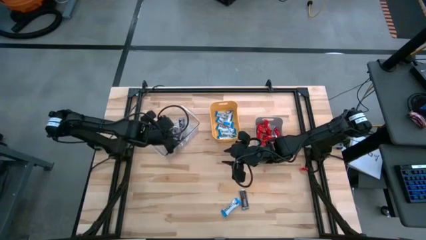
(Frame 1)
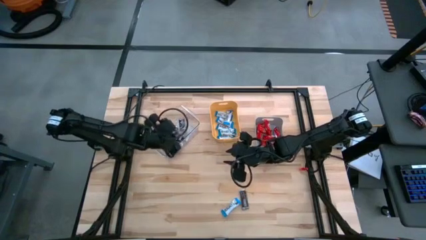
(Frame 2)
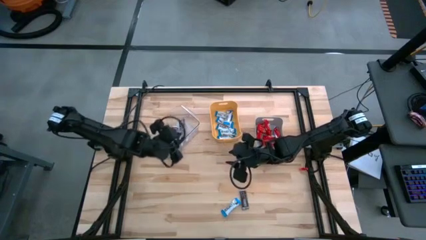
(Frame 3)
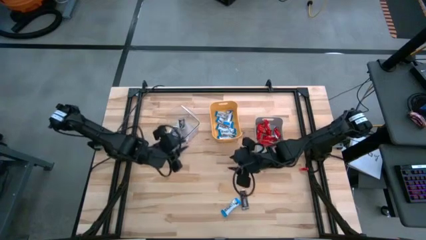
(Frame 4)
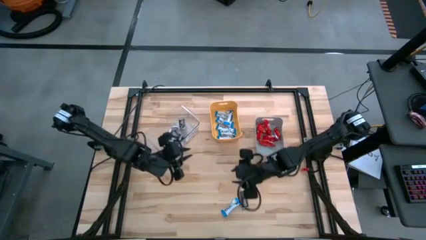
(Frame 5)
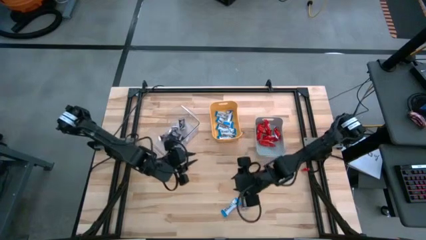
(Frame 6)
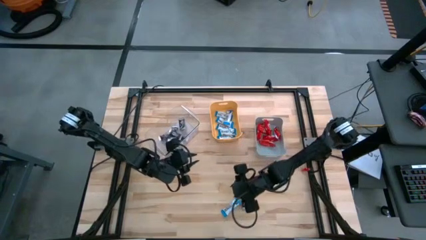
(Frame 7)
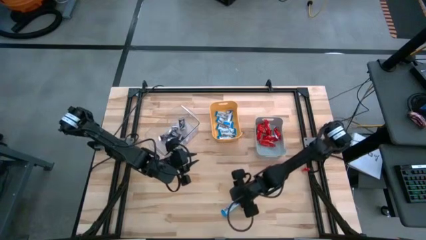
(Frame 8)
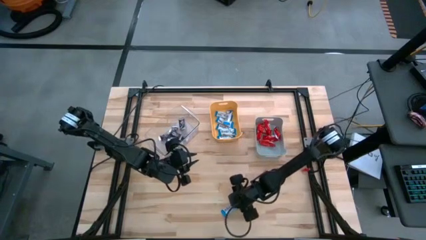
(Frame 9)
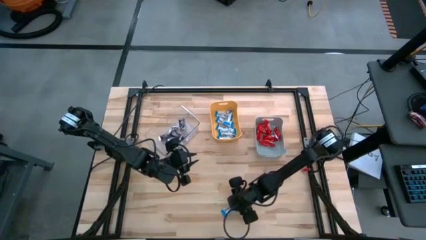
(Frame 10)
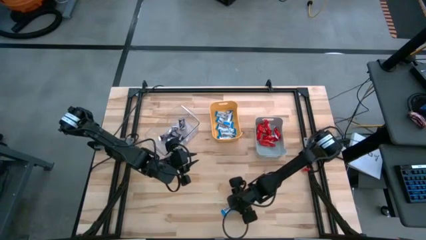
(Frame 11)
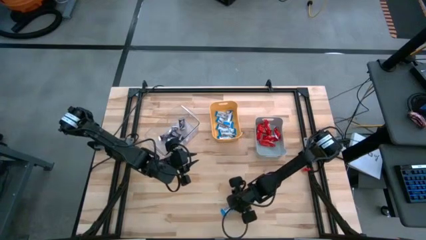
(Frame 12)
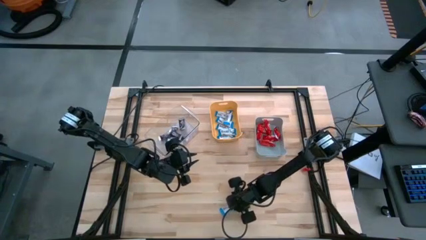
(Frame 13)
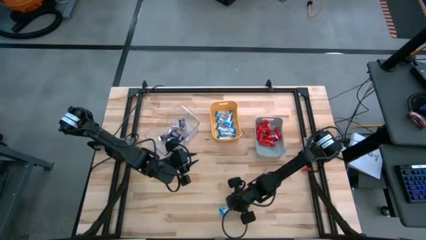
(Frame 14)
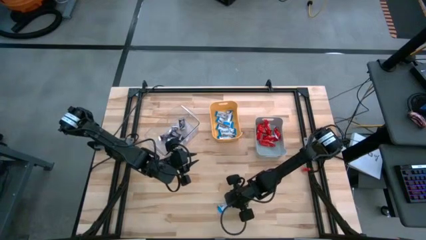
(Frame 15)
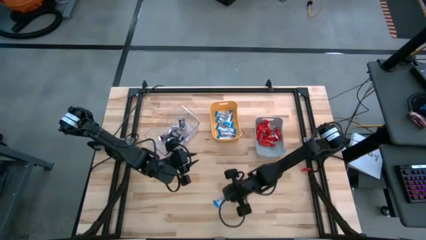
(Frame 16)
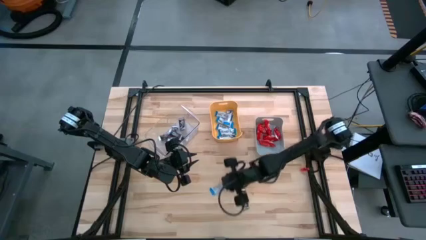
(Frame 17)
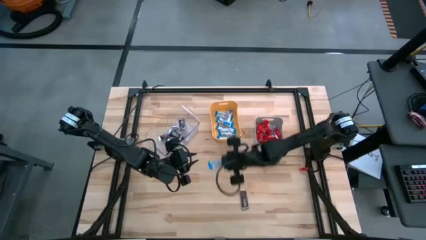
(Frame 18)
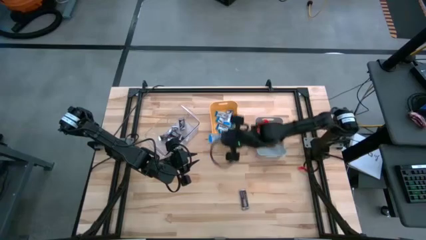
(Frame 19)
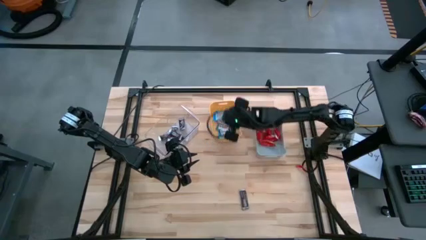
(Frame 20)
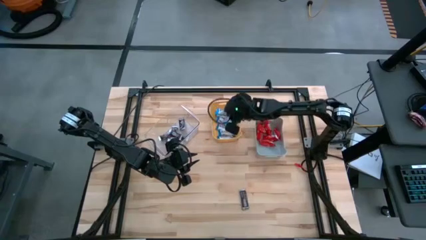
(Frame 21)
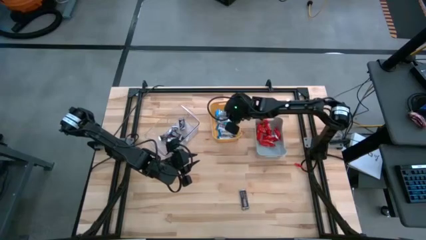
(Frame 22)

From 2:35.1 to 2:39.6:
Task: Organize candy in baskets
Put the white chocolate into the yellow bin

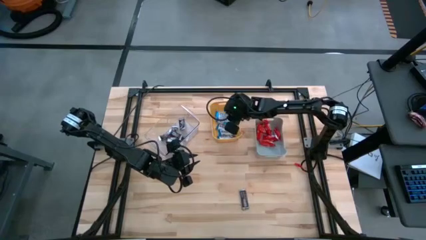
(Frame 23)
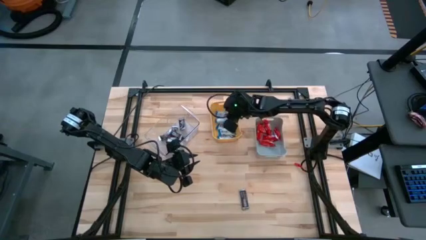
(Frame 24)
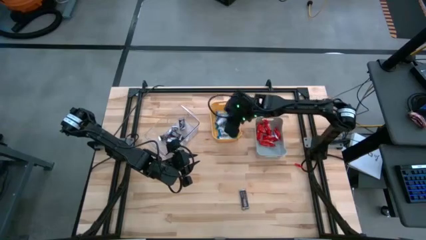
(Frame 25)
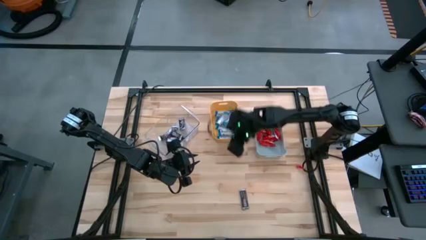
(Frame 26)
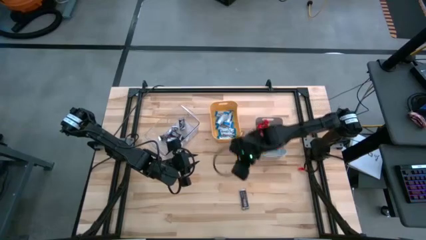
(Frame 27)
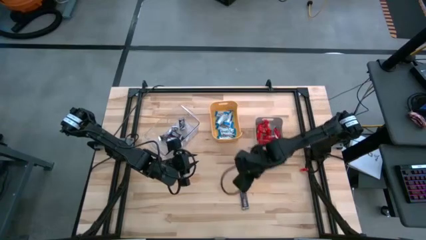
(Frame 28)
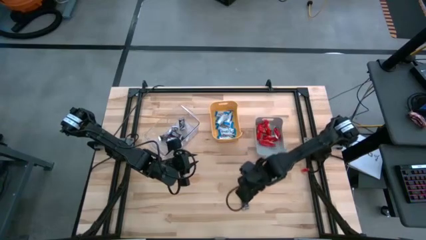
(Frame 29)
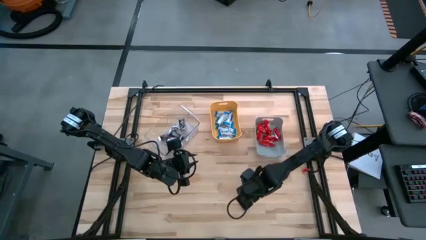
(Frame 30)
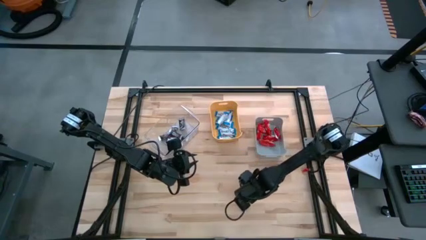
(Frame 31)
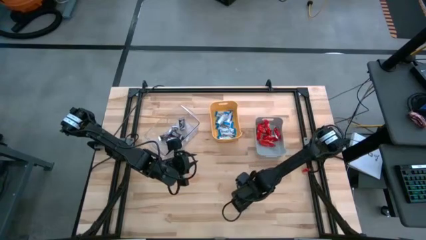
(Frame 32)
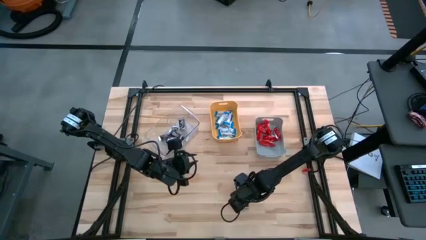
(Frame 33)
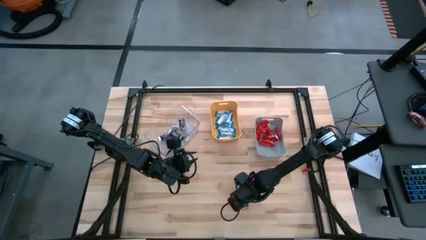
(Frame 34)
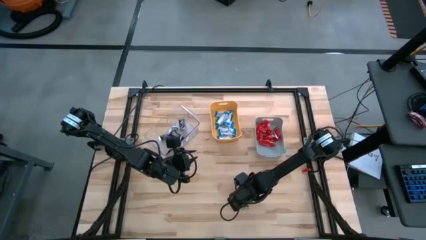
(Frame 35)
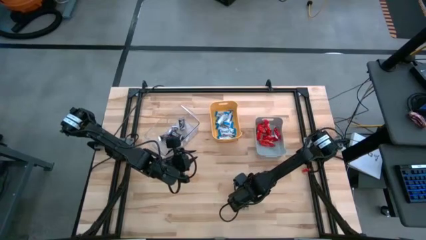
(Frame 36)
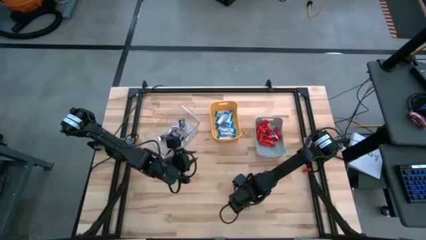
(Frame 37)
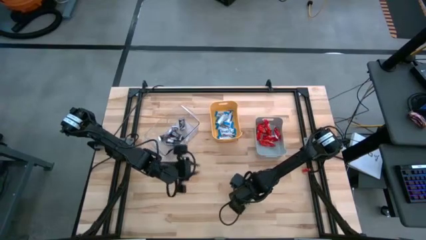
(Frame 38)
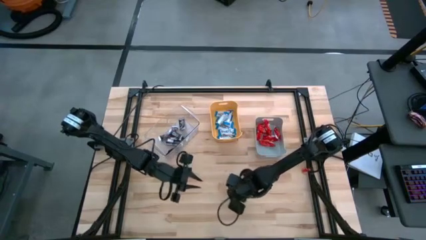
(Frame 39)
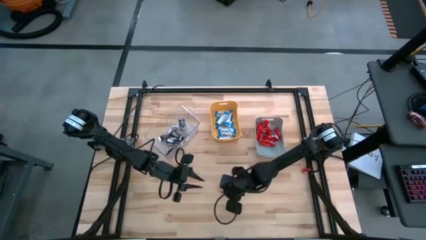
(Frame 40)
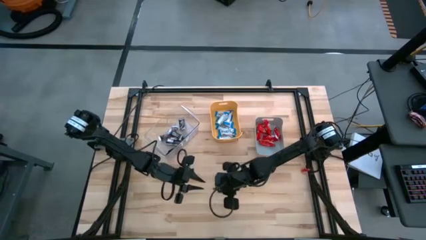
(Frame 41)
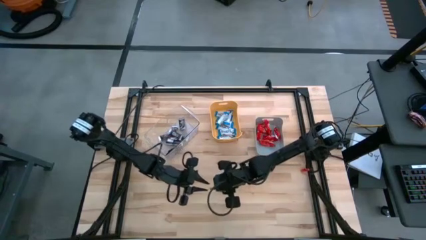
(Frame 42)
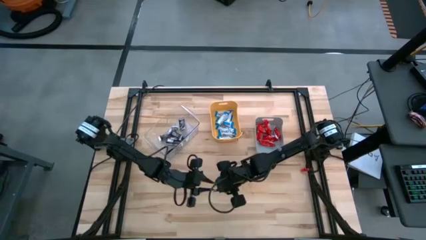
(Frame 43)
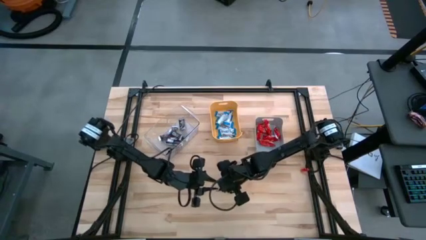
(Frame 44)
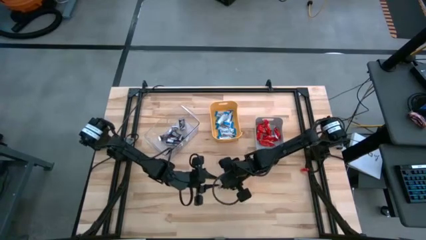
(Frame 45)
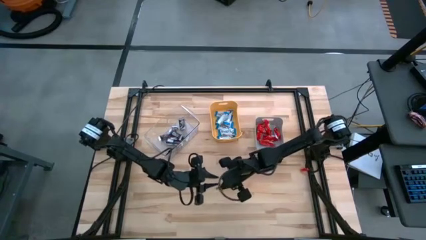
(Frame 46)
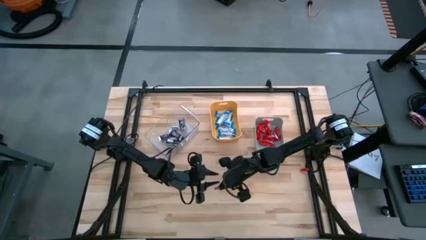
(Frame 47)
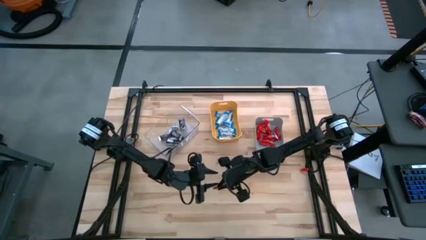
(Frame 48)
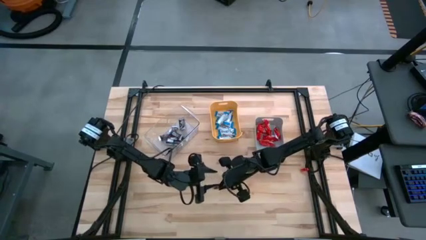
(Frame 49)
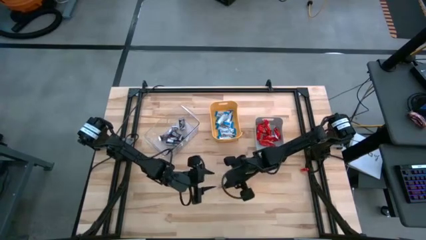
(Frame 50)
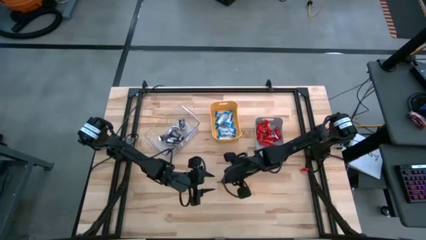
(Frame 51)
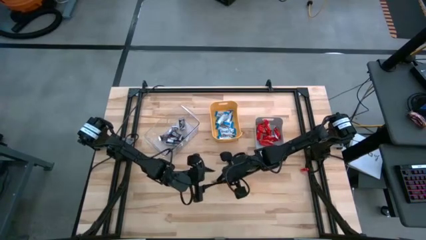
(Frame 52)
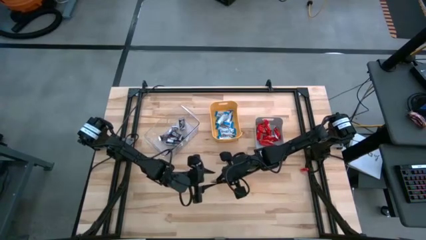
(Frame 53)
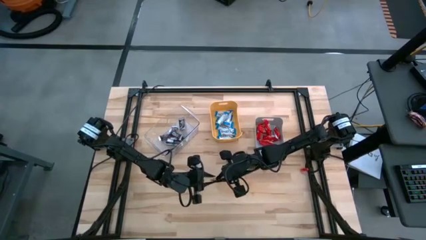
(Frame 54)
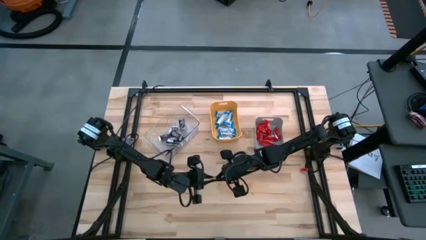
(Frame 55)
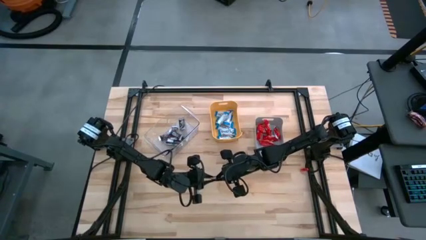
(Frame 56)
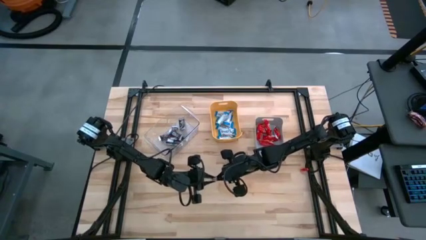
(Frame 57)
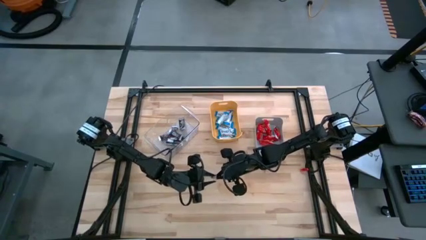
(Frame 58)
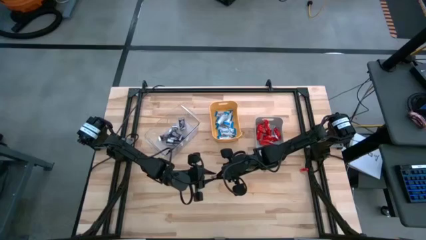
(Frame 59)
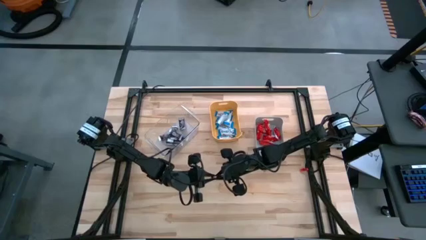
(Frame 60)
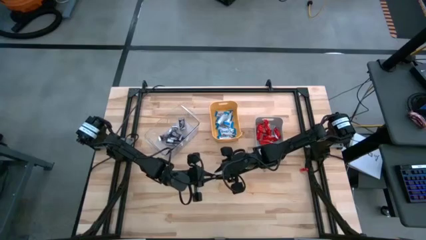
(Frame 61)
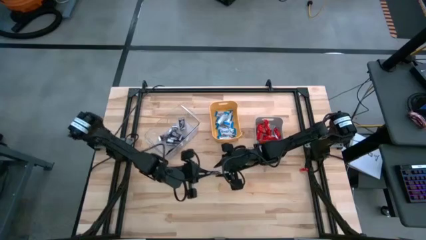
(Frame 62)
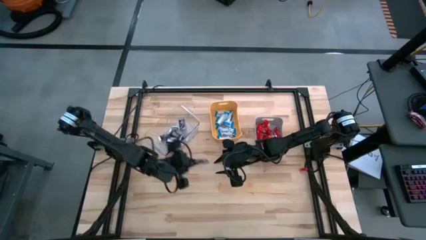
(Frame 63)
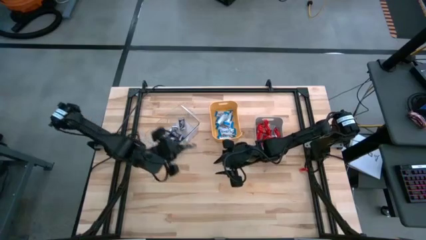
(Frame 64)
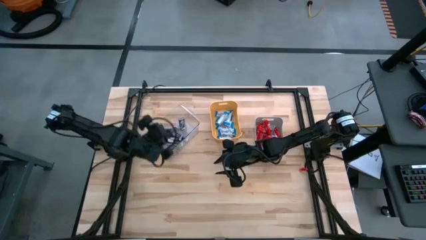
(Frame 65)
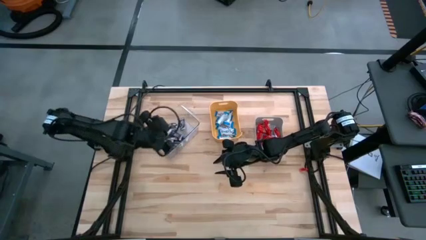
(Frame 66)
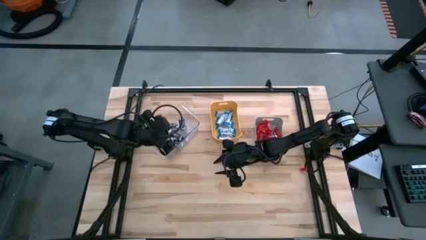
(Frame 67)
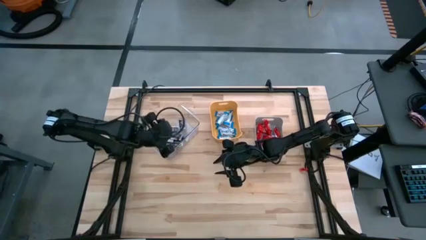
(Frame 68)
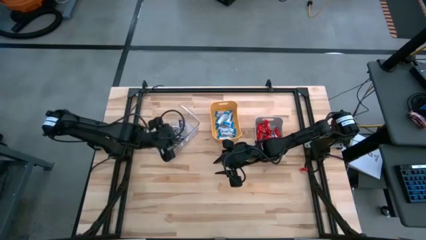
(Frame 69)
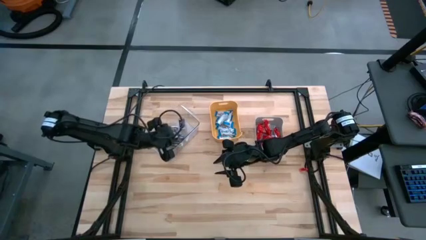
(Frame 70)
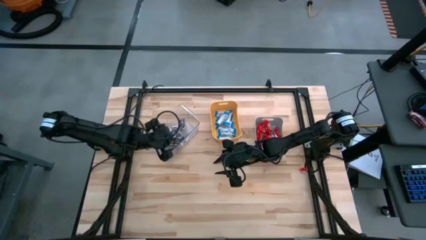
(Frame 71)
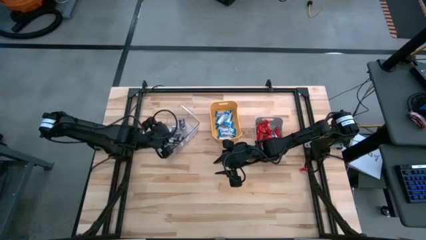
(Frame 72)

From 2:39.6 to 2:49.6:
Put the brown chocolate into the transparent bin

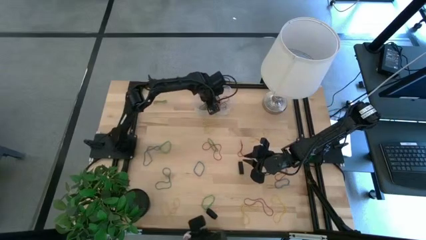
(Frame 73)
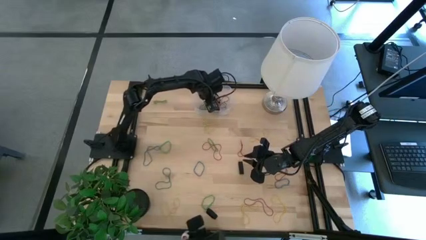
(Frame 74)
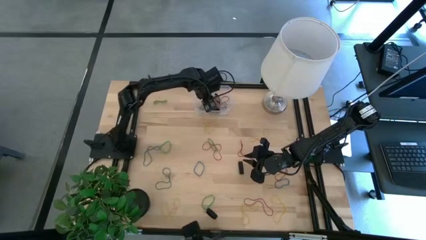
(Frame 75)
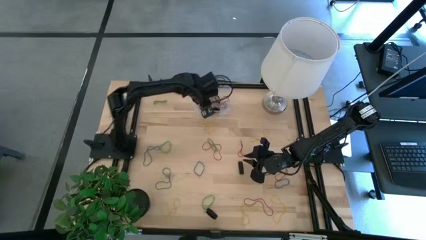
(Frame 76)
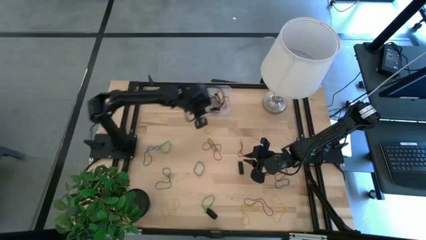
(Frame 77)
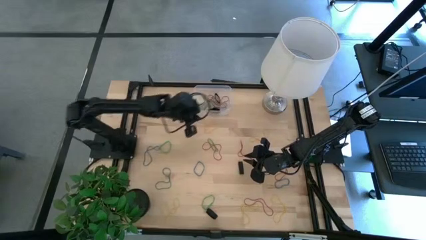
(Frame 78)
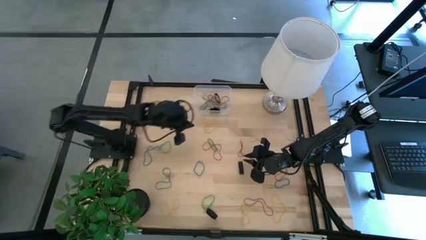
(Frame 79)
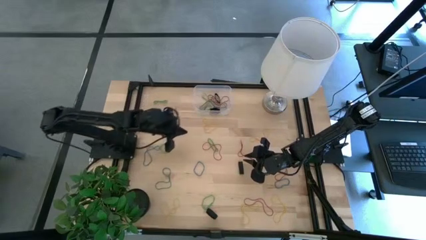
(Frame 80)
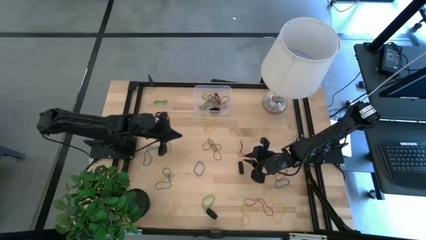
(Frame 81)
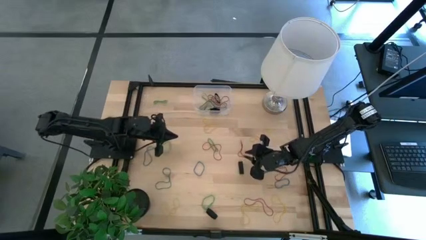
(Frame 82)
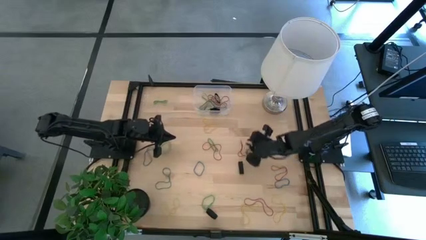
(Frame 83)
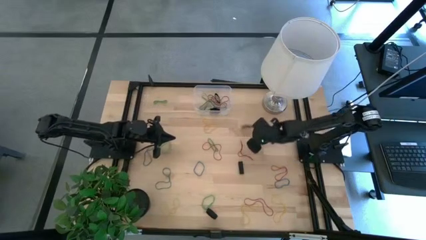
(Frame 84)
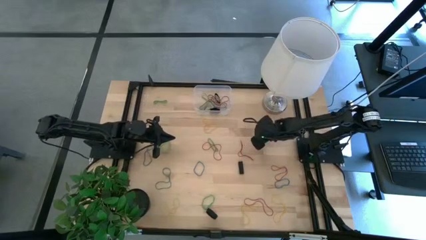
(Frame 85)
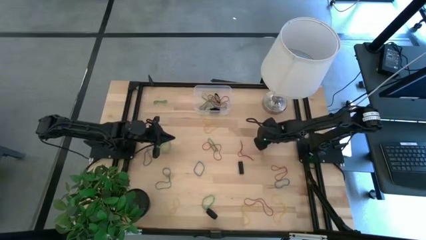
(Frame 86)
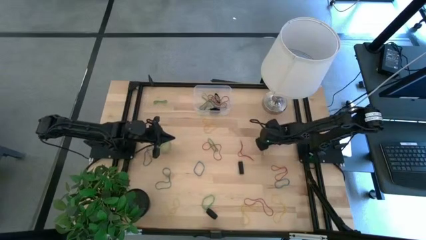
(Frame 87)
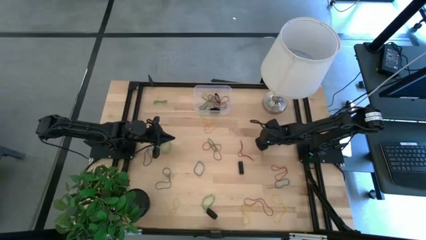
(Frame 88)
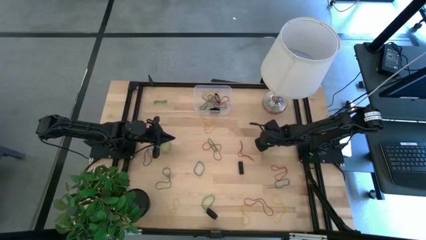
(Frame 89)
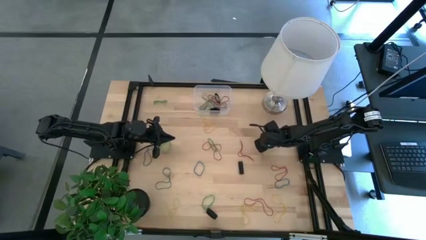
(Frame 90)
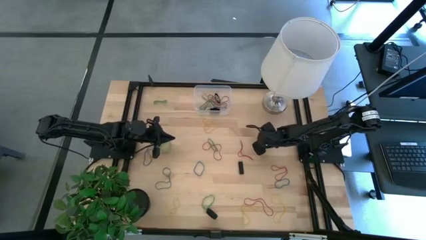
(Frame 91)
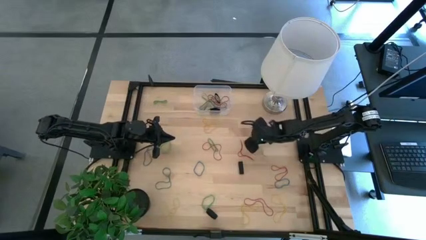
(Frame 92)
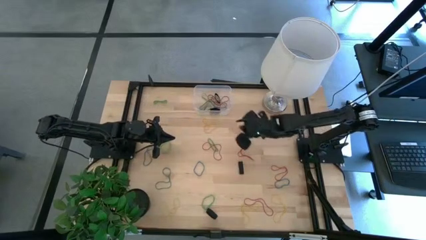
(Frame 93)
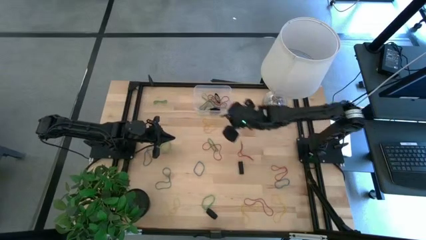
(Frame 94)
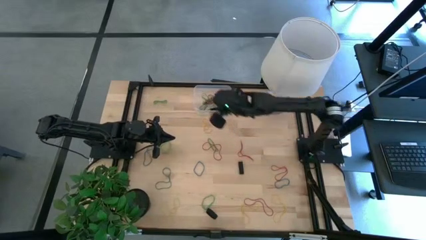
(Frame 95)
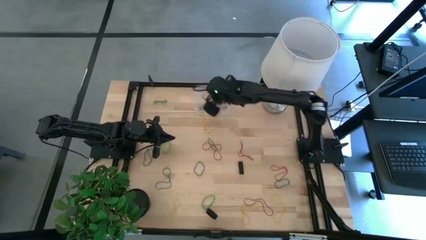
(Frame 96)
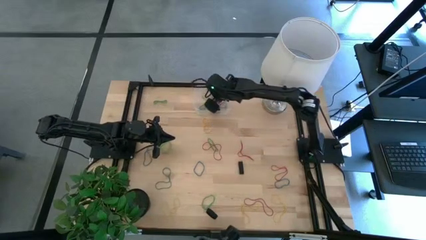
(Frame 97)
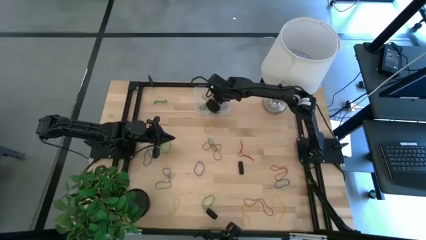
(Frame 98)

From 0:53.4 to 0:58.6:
Task: Pick and place rubber bands into bin
Put the yellow rubber band into the transparent bin
